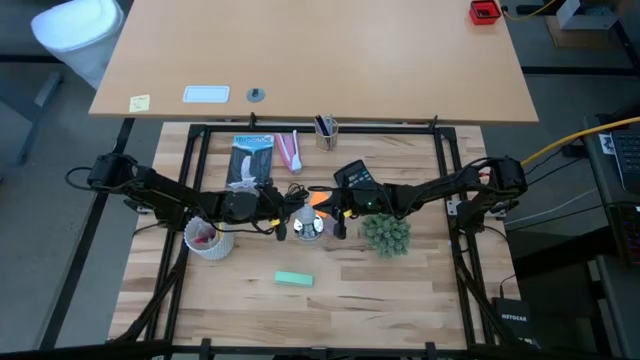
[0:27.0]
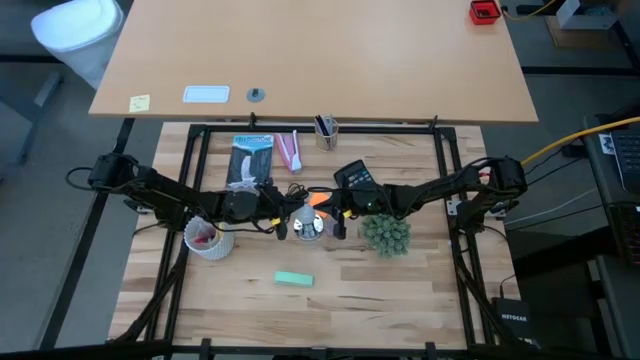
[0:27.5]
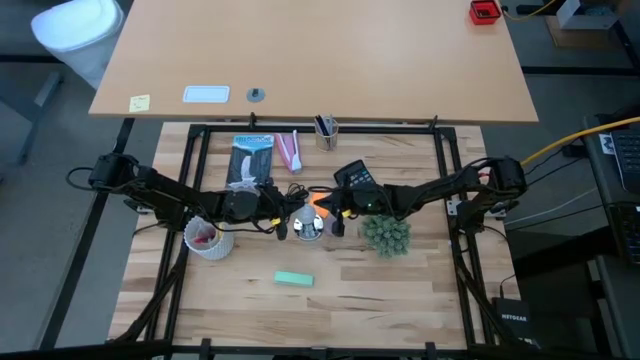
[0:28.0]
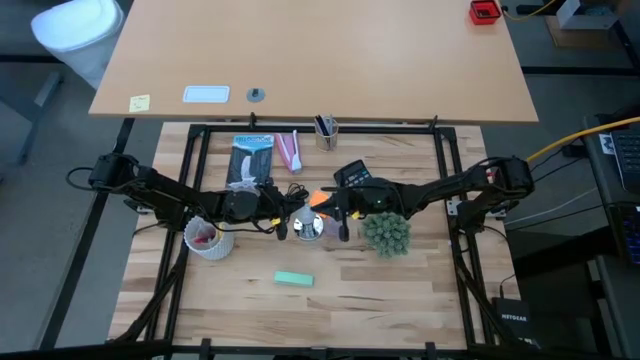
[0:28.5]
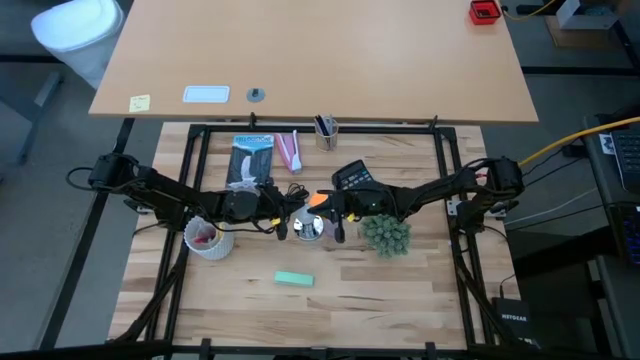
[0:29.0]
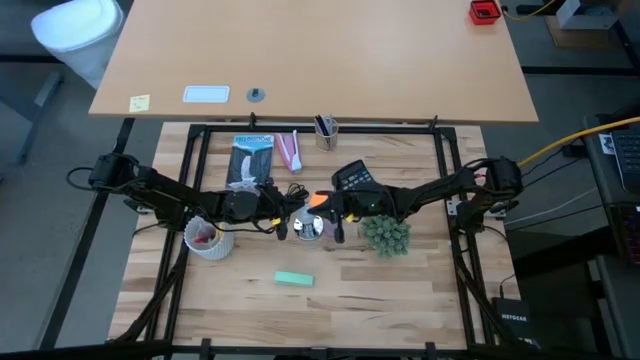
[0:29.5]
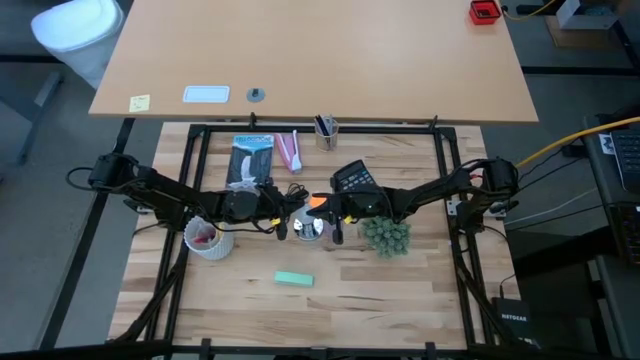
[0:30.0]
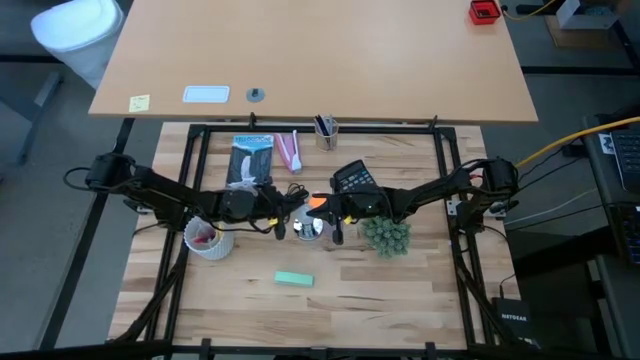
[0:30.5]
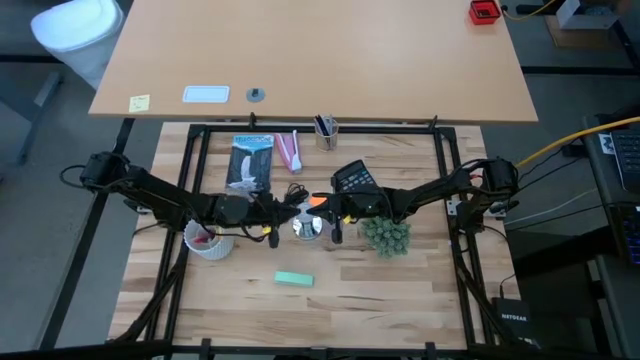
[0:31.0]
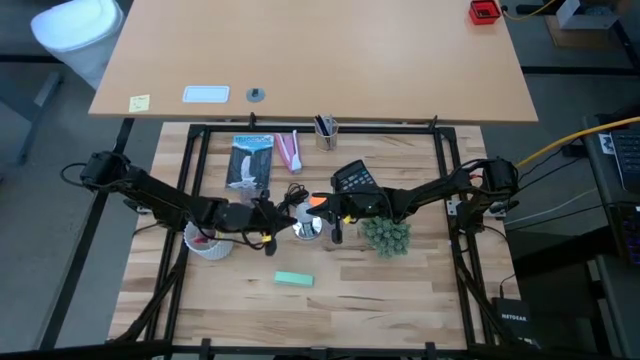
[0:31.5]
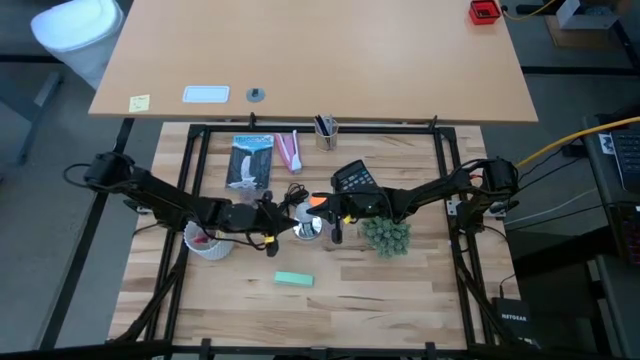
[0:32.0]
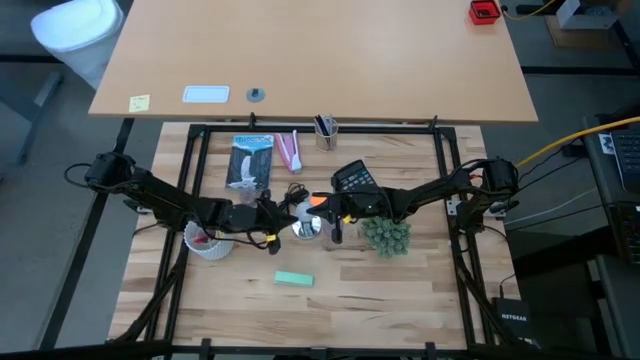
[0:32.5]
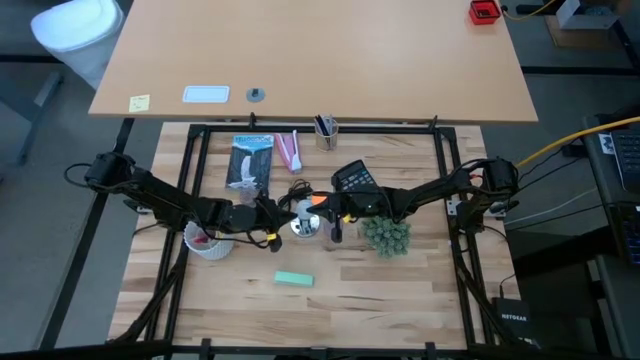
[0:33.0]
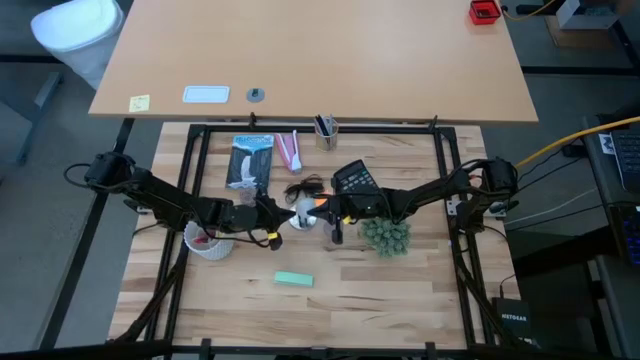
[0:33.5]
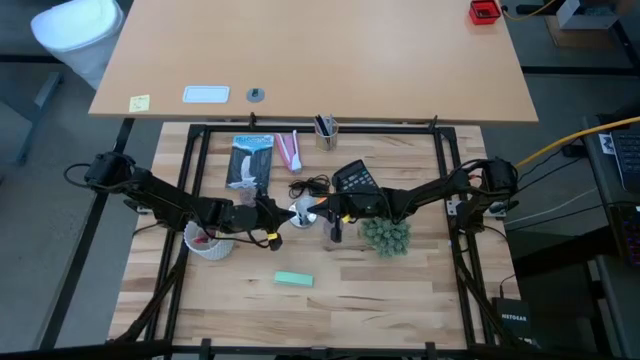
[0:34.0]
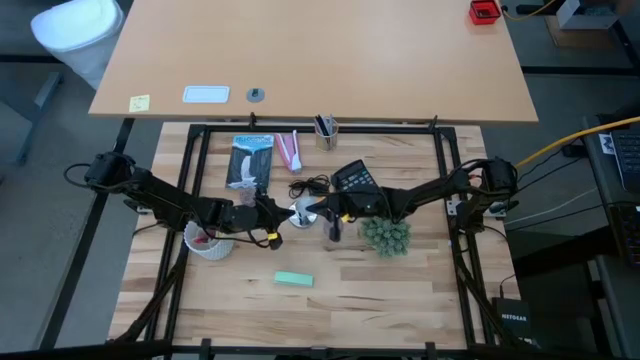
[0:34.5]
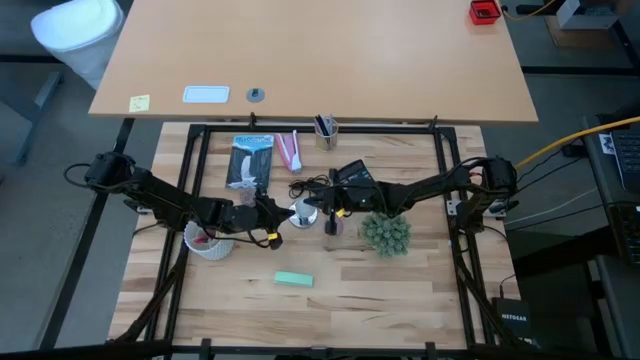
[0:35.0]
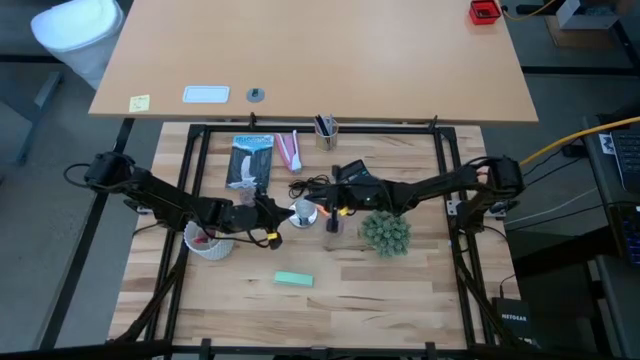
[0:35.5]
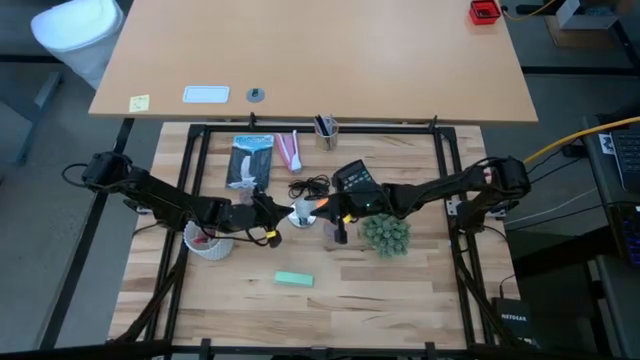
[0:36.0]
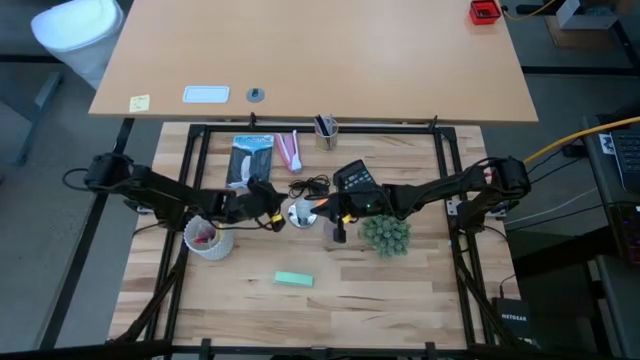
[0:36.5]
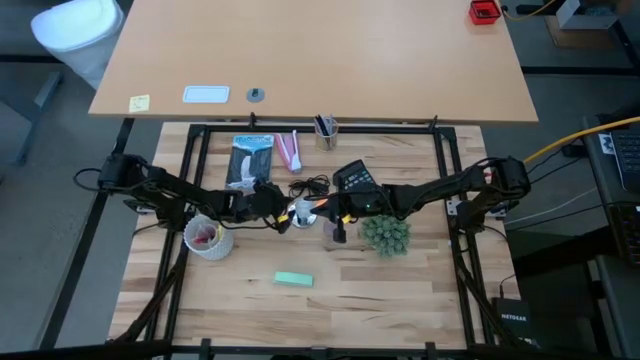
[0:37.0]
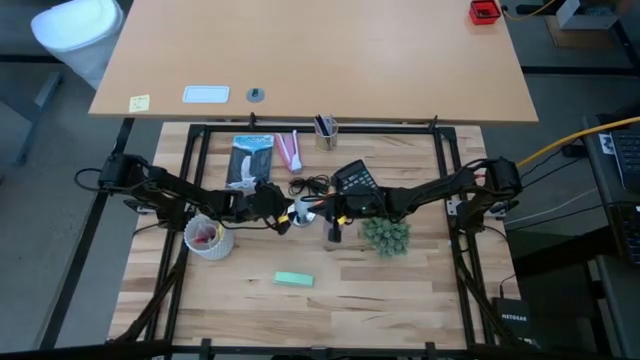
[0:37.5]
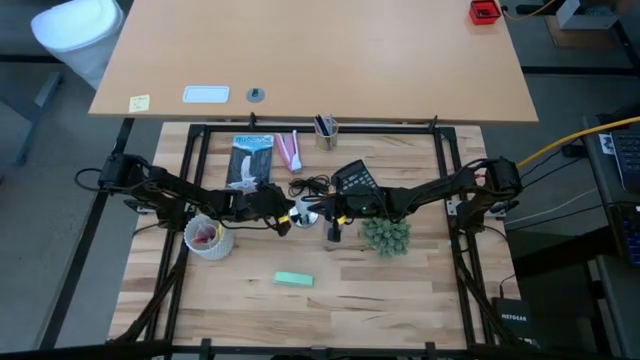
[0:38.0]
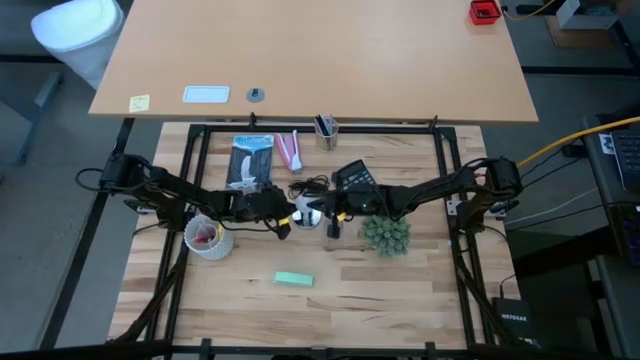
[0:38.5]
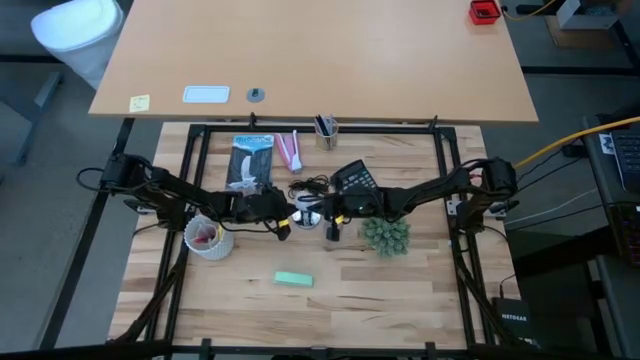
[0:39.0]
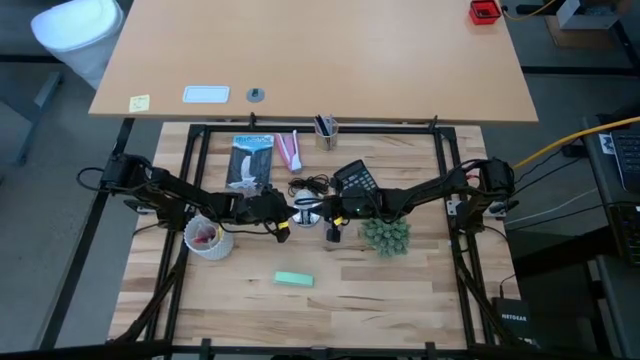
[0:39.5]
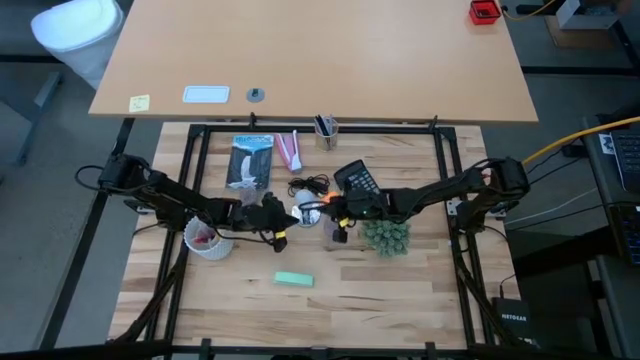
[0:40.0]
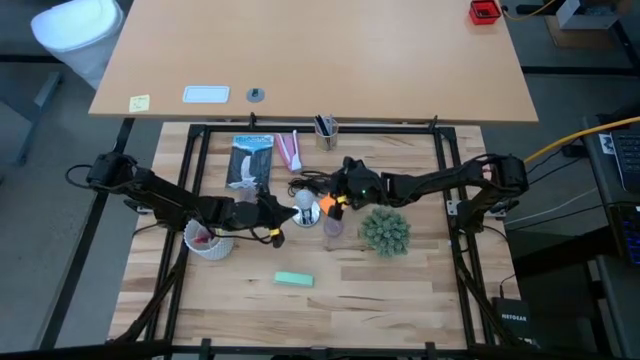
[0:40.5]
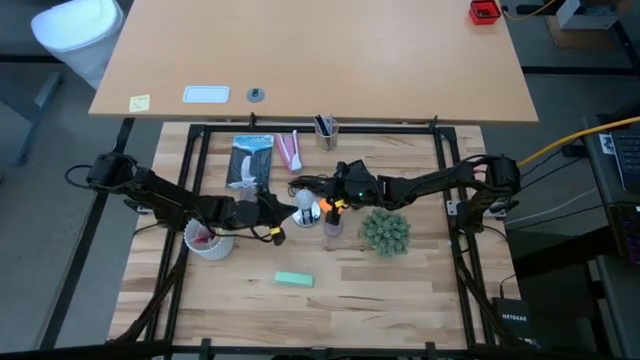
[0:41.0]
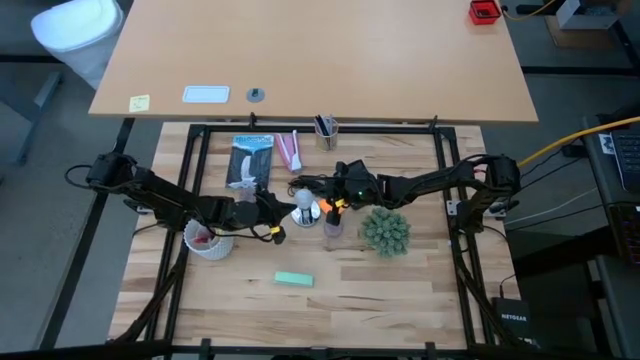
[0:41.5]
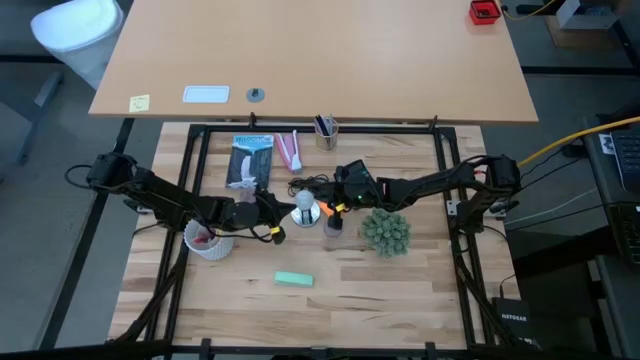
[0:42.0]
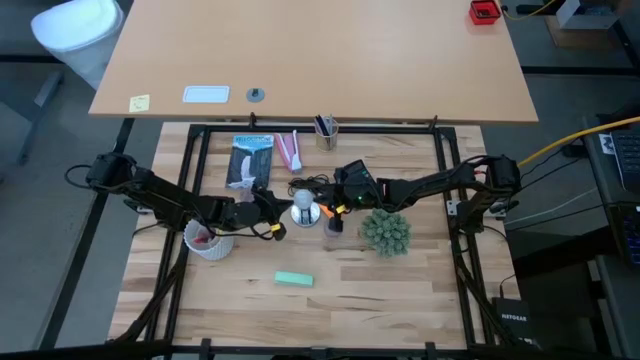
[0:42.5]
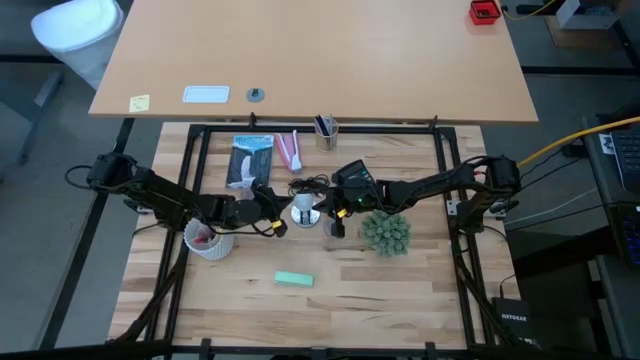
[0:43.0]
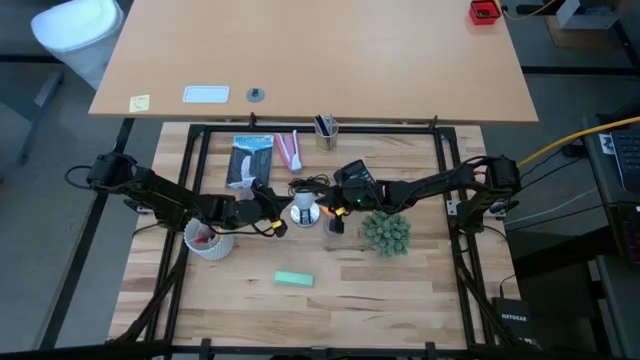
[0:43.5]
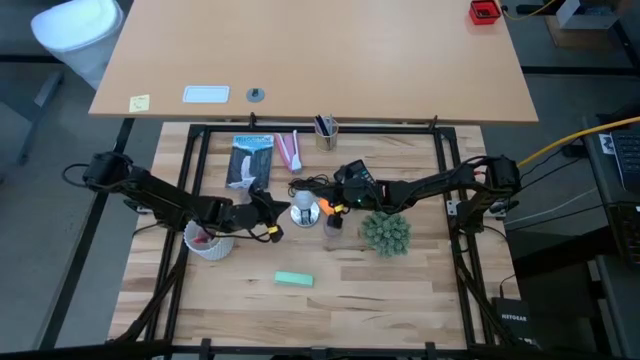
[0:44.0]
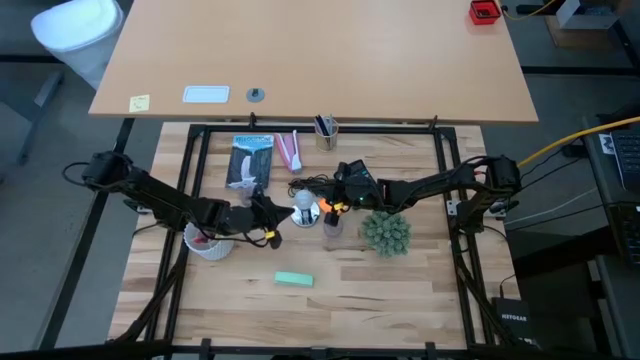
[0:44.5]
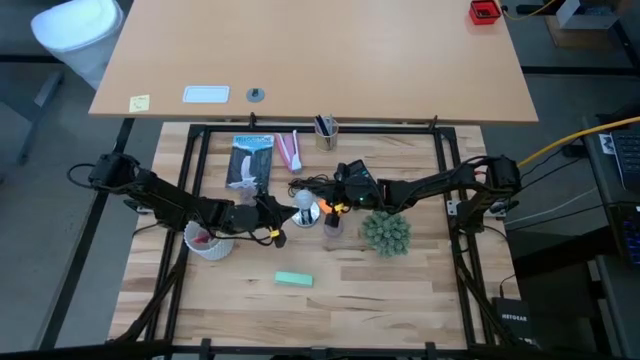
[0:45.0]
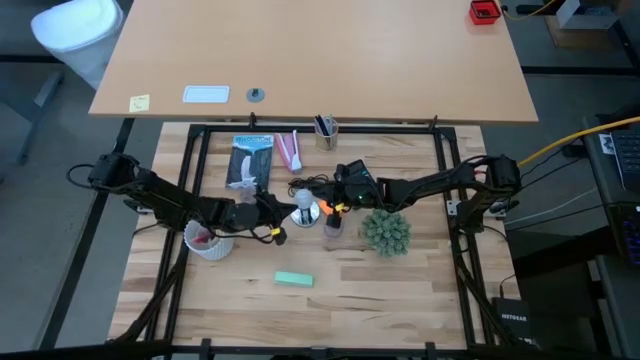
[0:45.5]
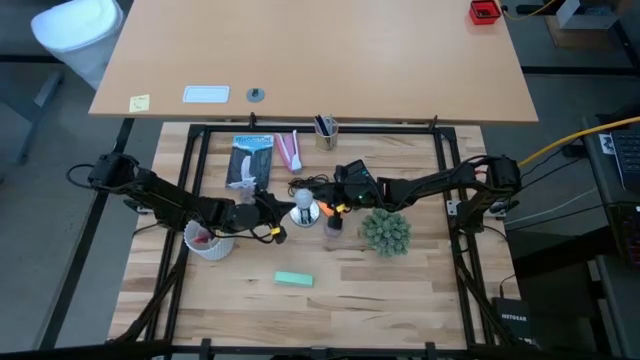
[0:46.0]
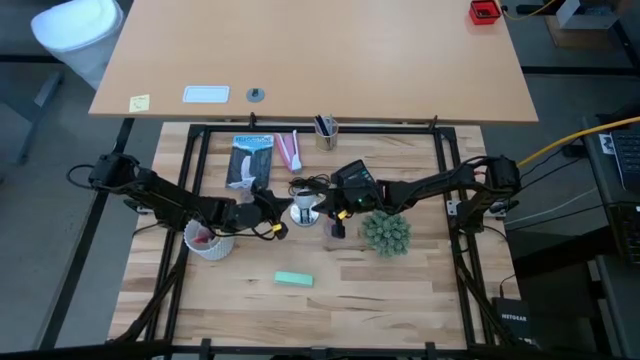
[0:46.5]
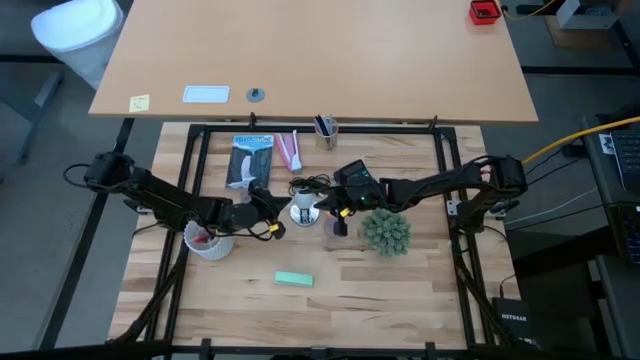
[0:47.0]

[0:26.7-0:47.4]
Task: Screw lightbulb
Insert the lightbulb on the lamp
